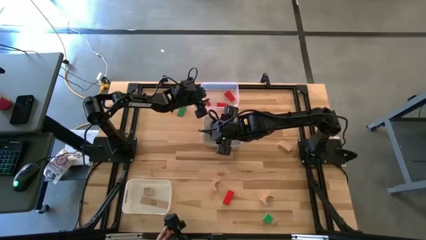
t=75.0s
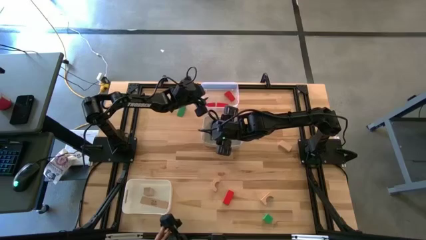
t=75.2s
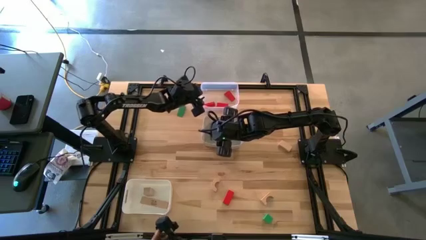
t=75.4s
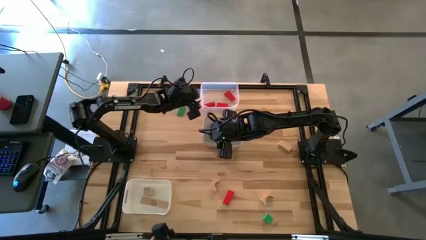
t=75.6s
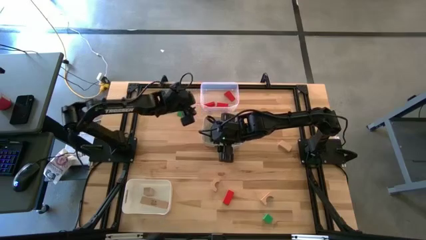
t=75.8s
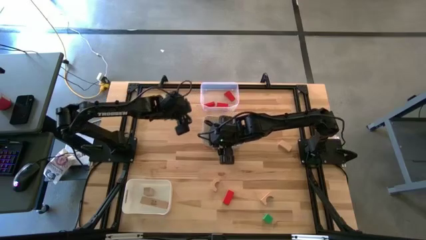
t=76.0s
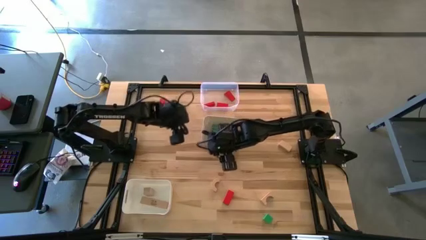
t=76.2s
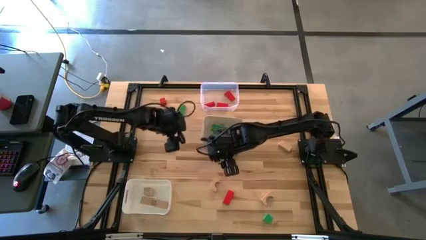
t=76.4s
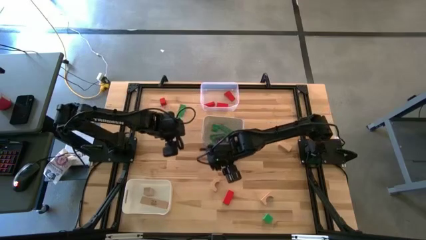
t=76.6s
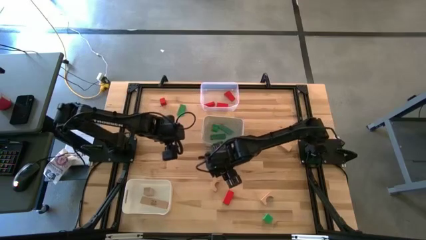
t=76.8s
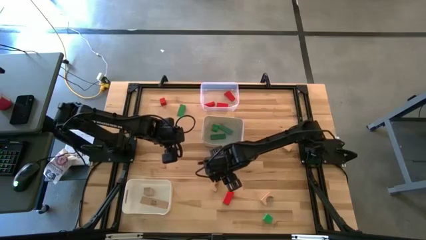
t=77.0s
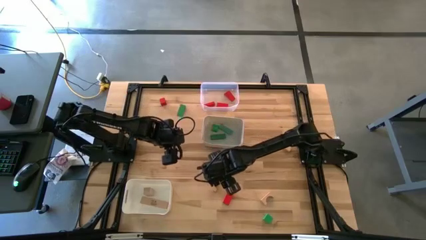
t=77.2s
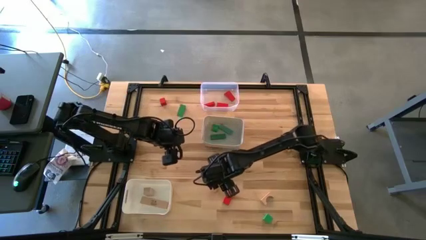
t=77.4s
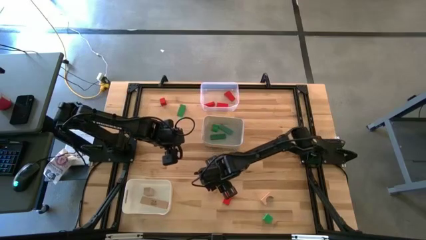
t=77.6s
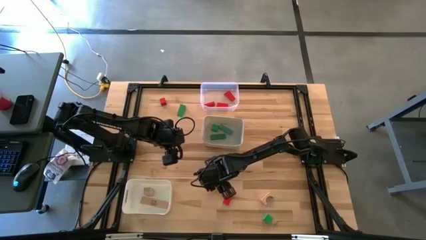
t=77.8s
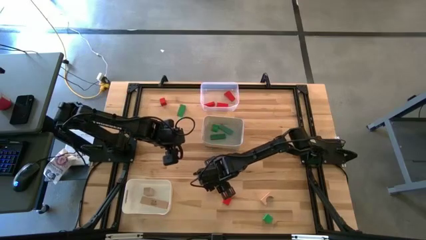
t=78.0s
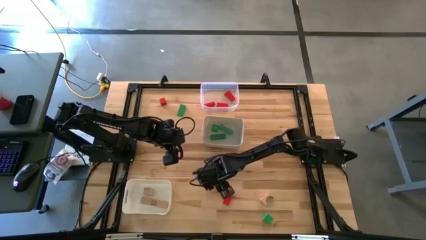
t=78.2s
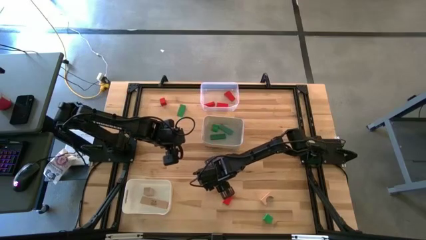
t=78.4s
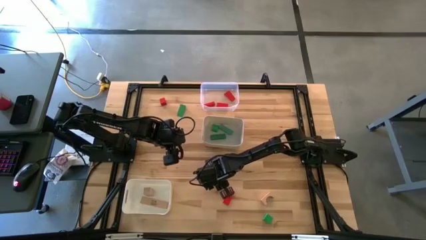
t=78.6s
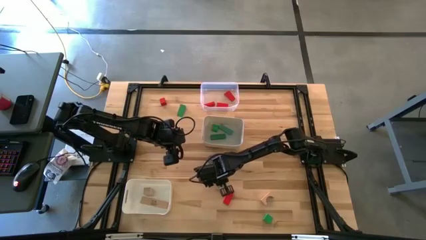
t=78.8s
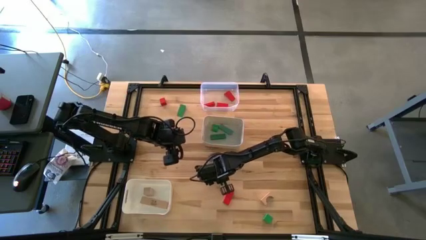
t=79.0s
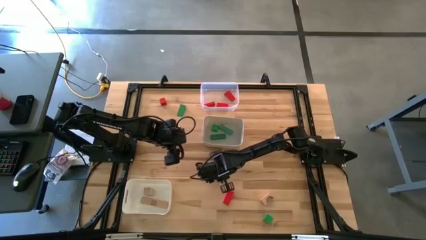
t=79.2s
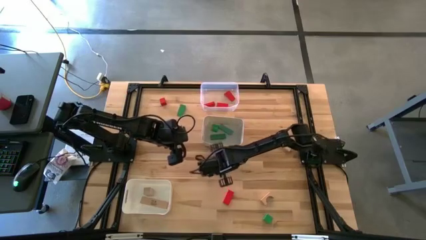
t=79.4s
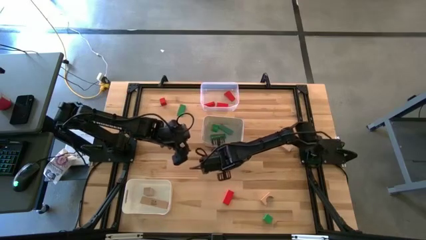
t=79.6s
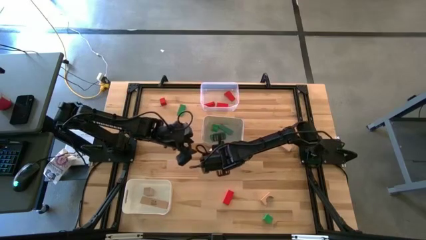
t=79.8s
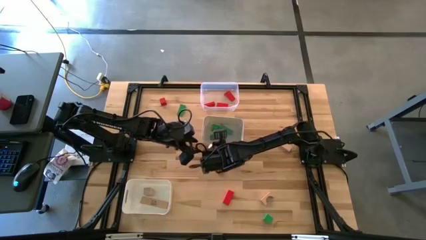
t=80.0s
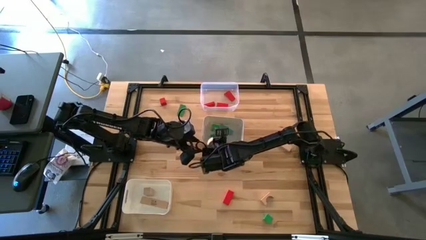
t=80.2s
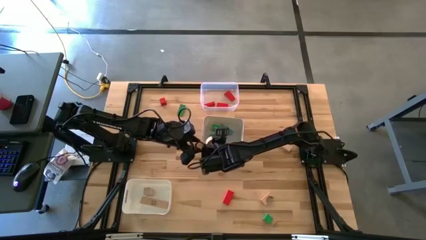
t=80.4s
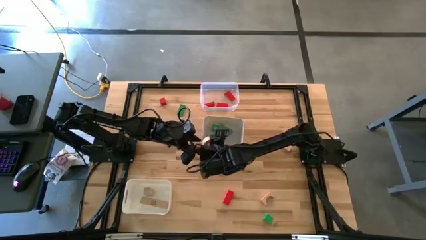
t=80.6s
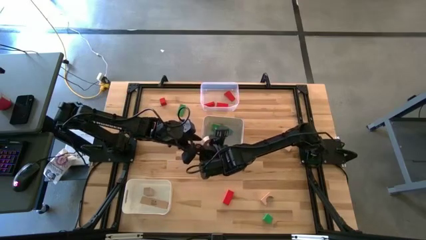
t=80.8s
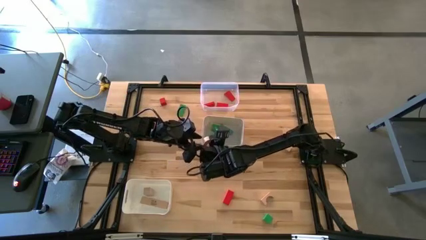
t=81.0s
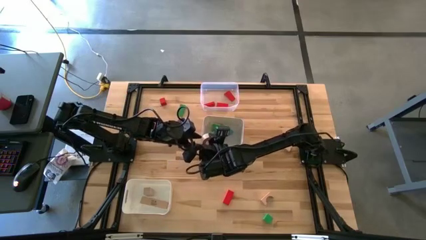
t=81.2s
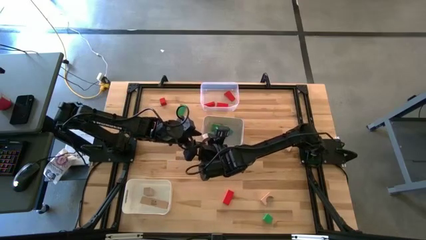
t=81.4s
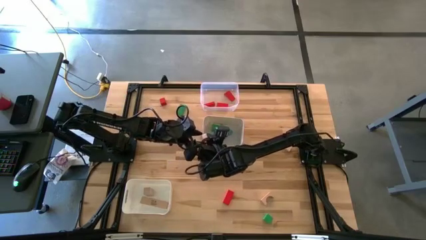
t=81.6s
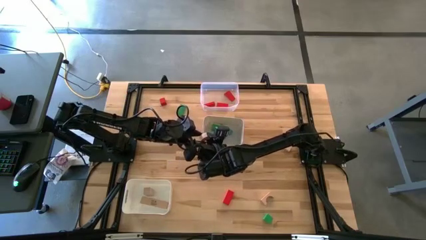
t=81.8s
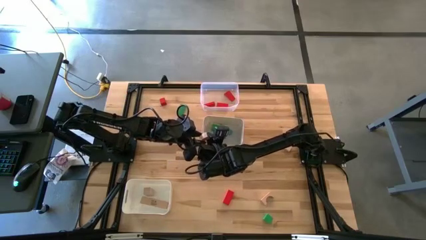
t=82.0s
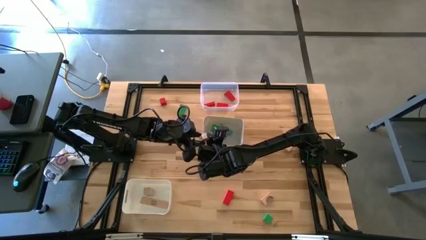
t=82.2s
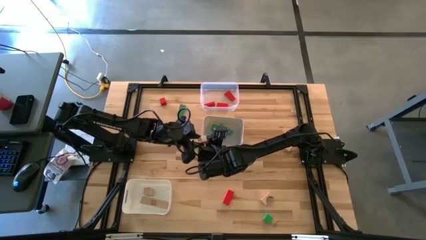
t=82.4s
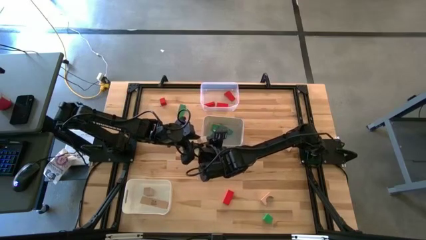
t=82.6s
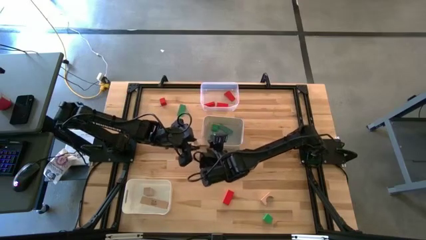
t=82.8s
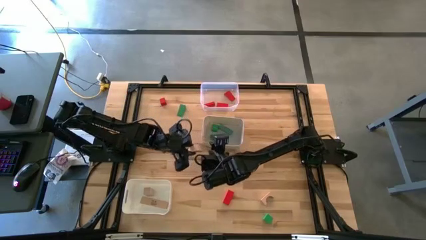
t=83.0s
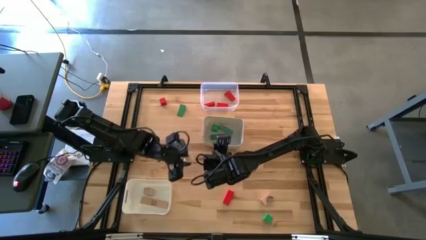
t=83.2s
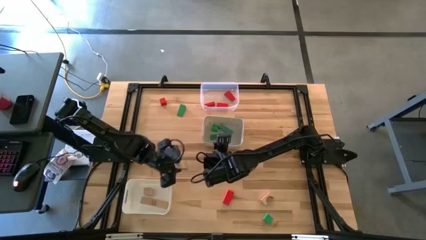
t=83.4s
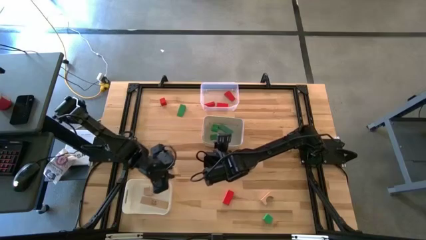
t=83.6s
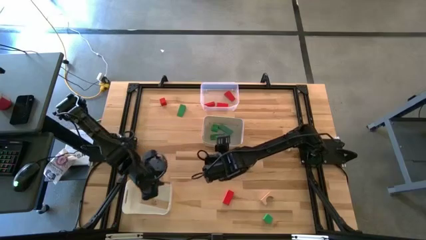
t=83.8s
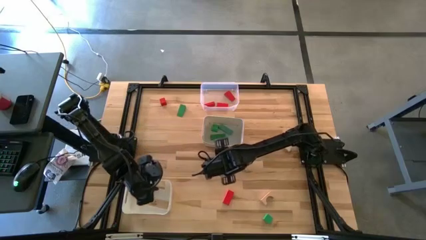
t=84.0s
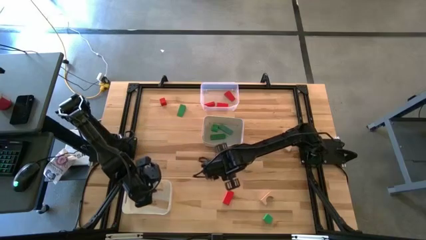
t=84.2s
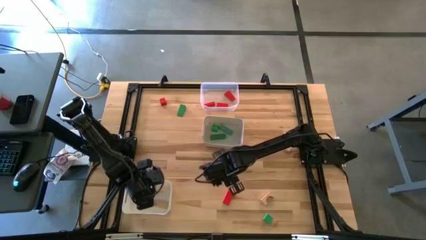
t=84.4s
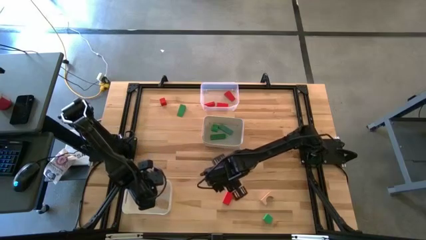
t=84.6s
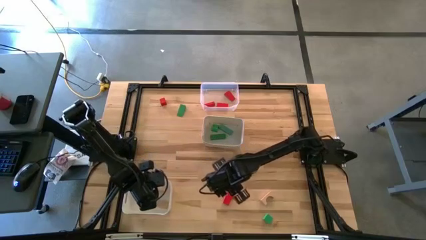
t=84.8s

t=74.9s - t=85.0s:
Task: Sort & place blocks by color
Put the brown half circle block into the bottom white bin

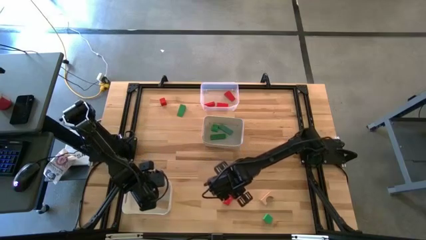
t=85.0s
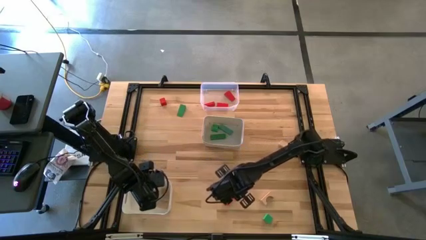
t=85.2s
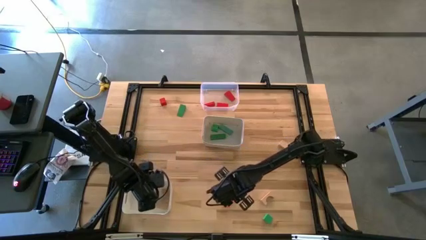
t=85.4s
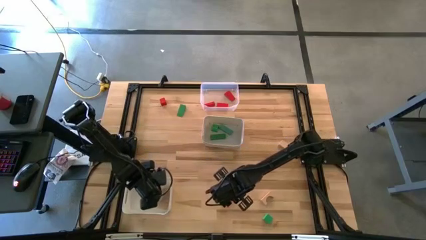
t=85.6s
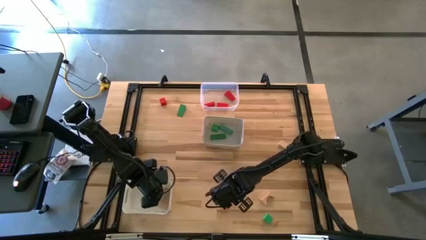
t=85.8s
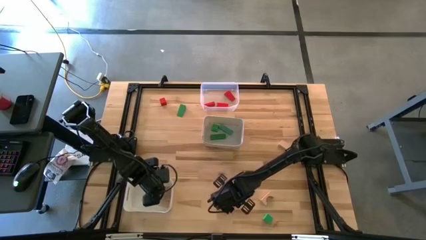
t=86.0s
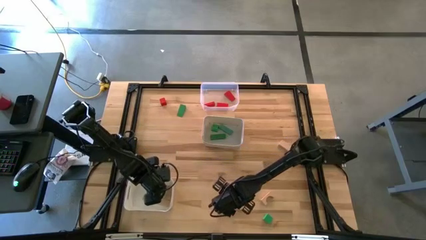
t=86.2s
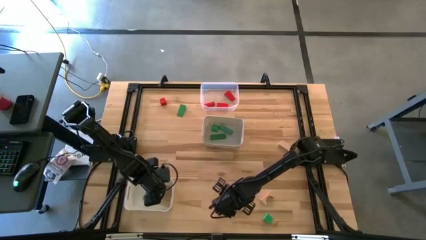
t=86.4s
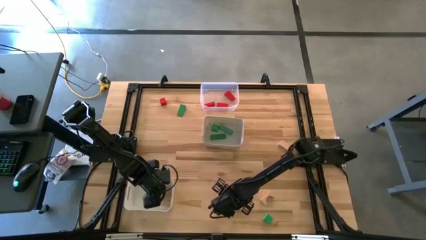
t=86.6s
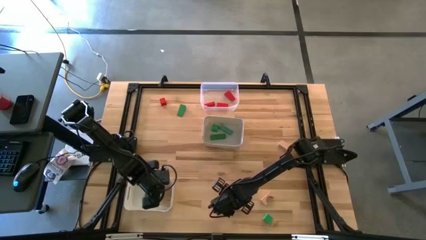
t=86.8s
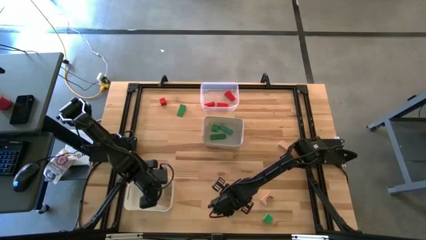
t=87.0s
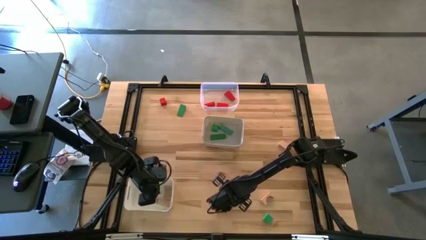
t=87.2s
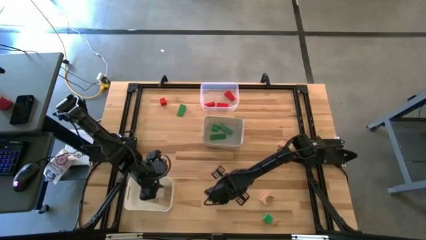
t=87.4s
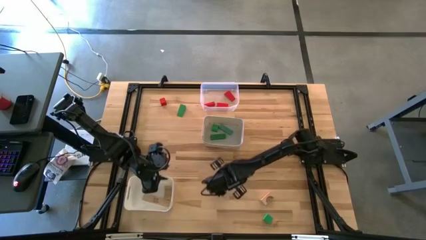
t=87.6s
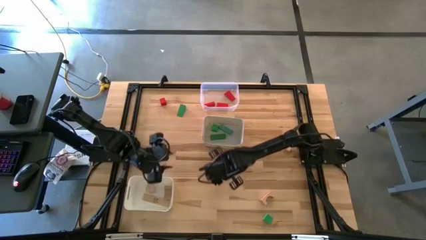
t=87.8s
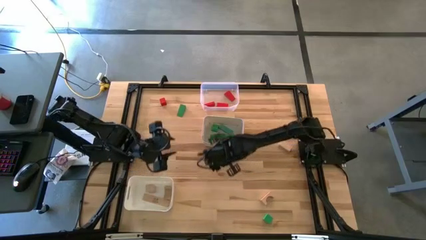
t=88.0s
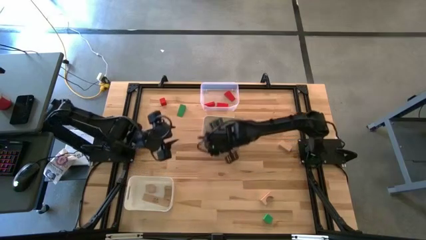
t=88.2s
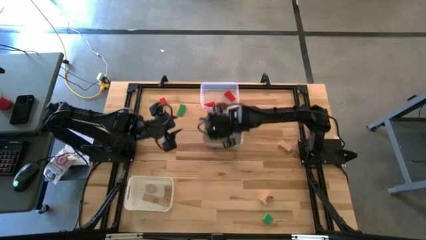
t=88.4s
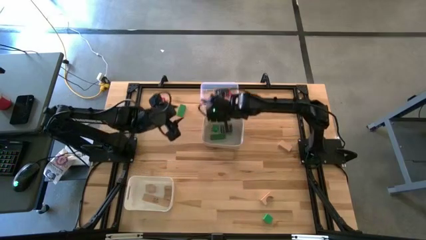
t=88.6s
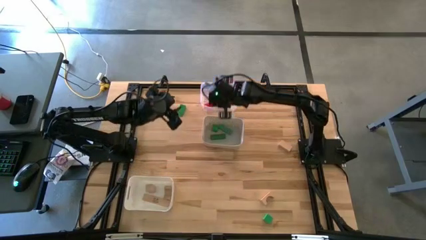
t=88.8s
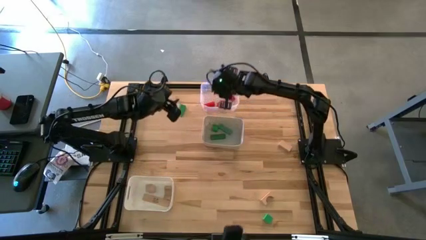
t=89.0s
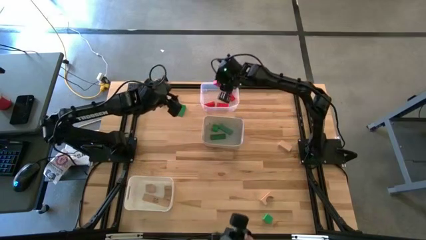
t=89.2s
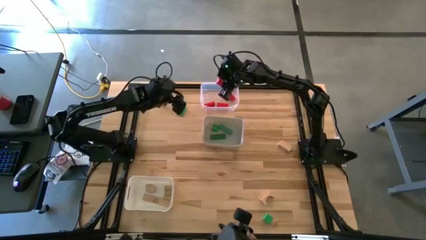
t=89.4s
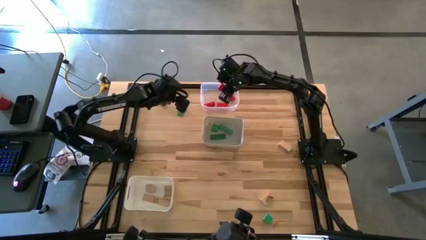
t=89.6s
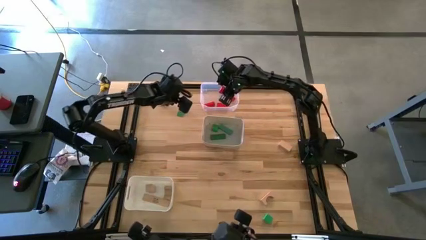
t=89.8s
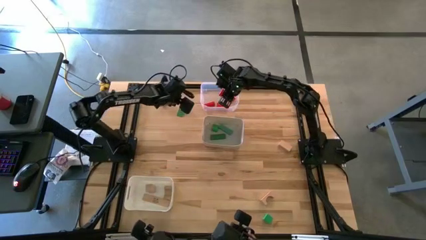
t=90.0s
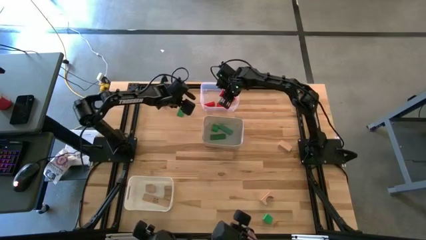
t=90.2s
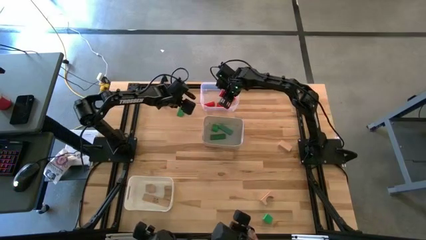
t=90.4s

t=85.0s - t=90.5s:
Put the bottom red rectangular block into the transparent bin

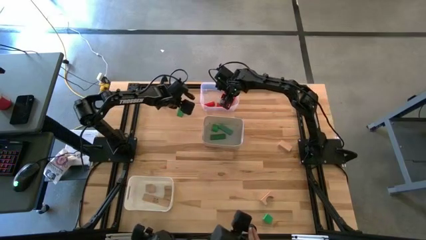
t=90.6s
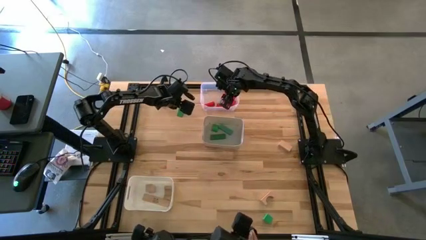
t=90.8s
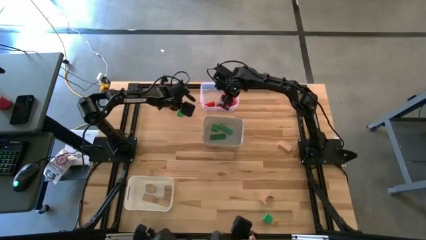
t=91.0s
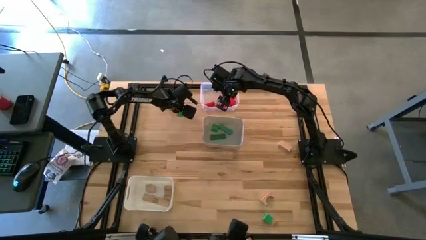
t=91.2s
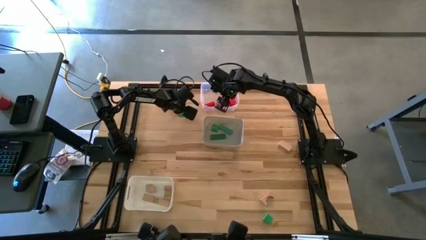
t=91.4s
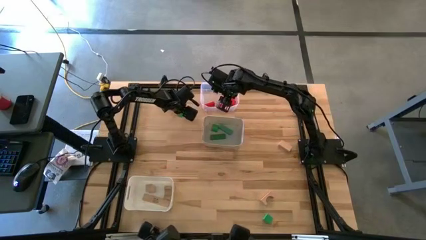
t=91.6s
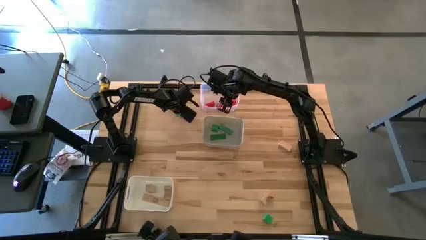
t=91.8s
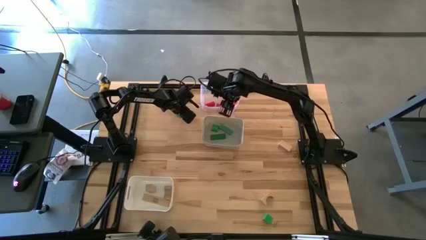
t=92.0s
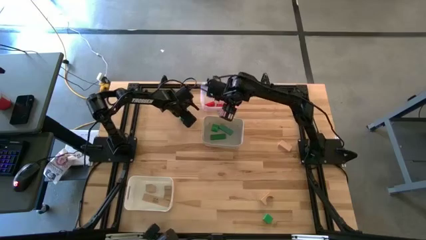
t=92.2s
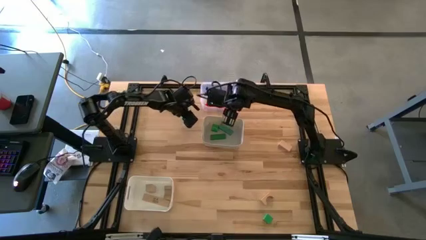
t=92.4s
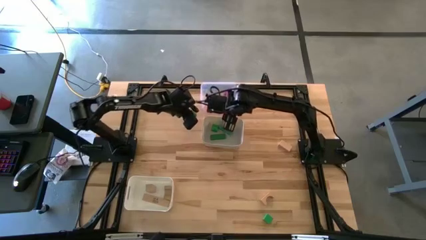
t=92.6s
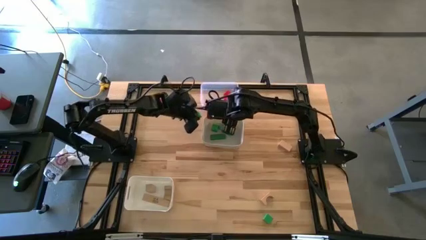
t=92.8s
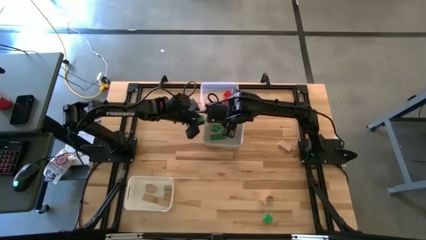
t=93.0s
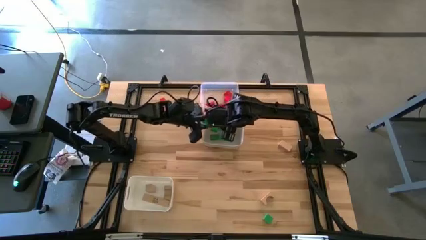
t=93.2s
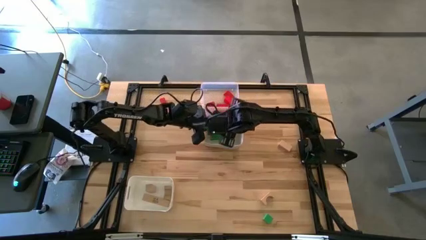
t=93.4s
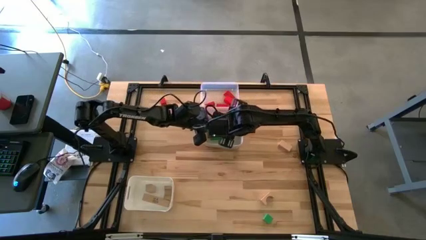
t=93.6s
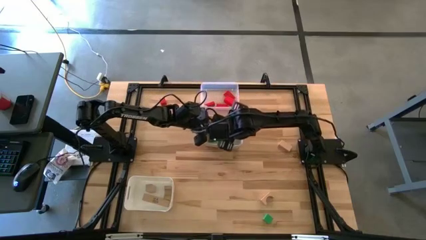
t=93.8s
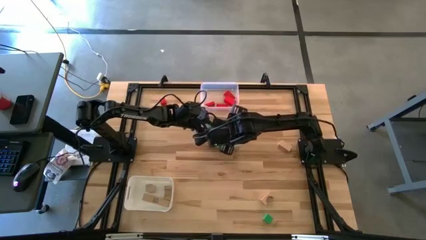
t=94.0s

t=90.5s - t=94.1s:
Put the top green rectangular block into the top white bin
